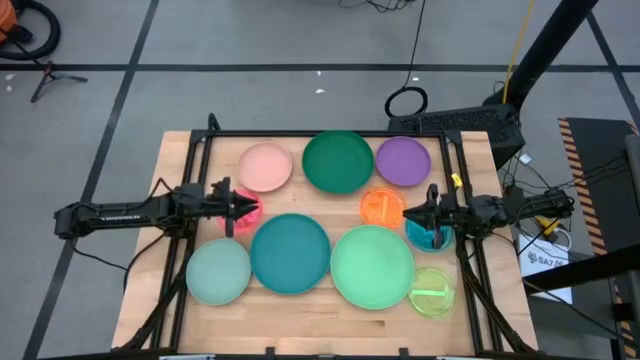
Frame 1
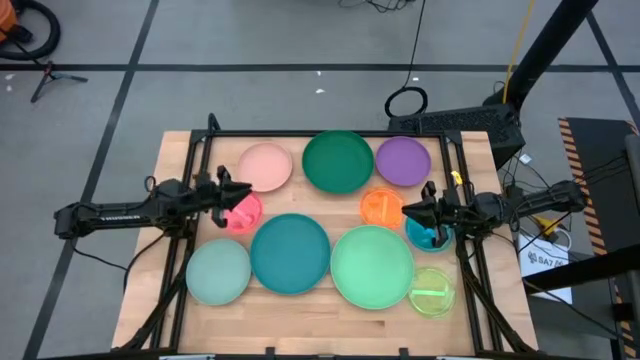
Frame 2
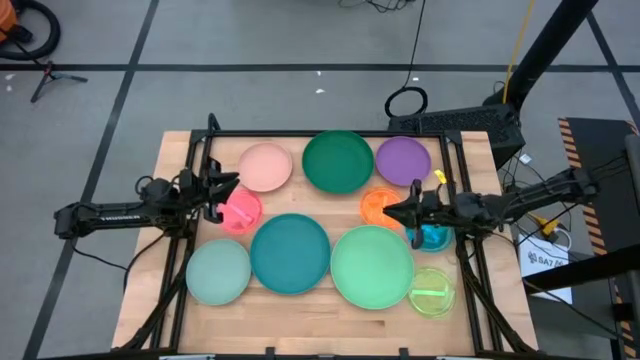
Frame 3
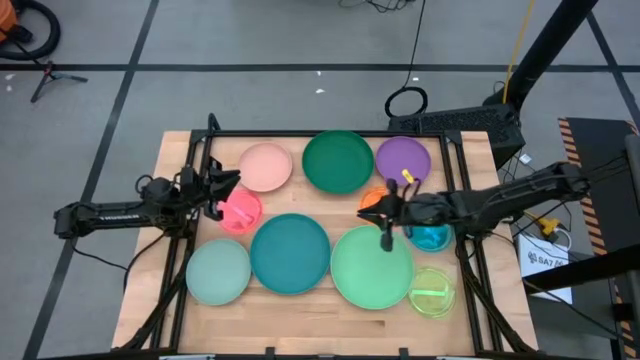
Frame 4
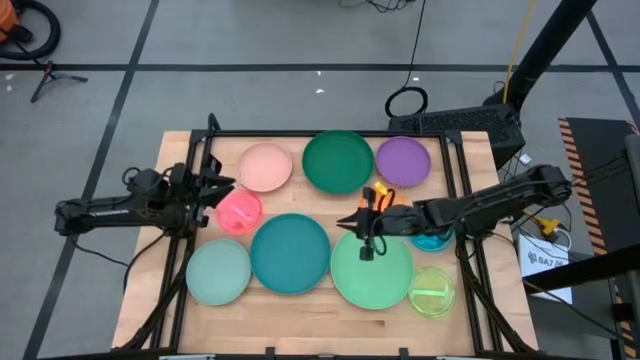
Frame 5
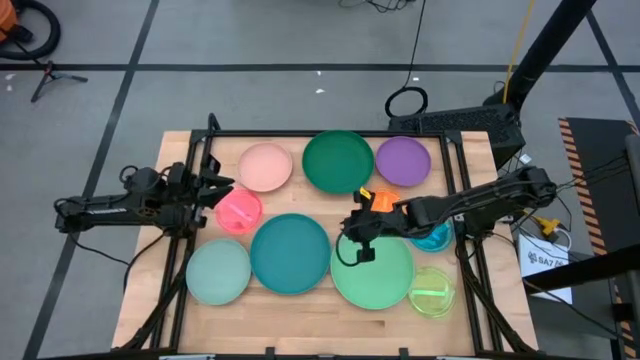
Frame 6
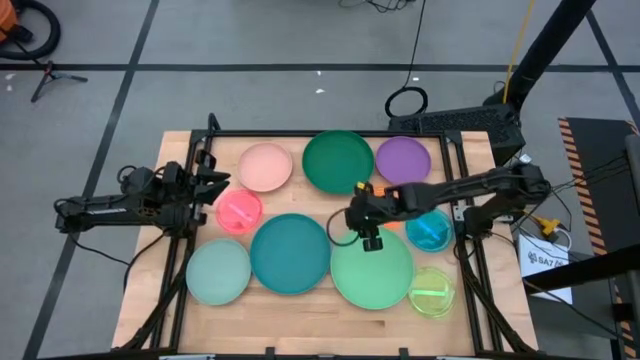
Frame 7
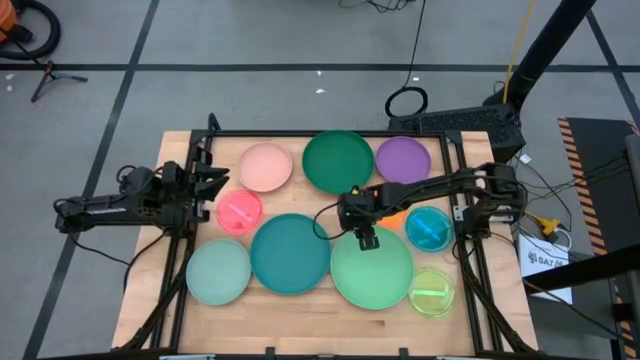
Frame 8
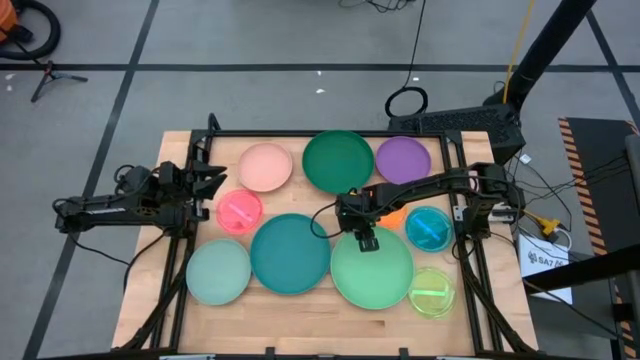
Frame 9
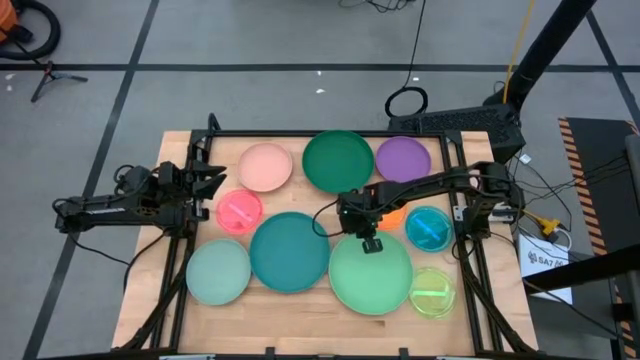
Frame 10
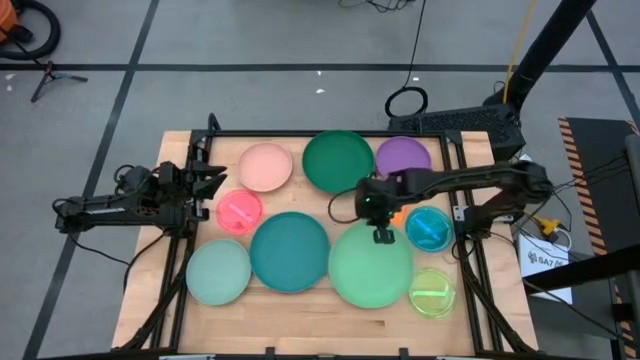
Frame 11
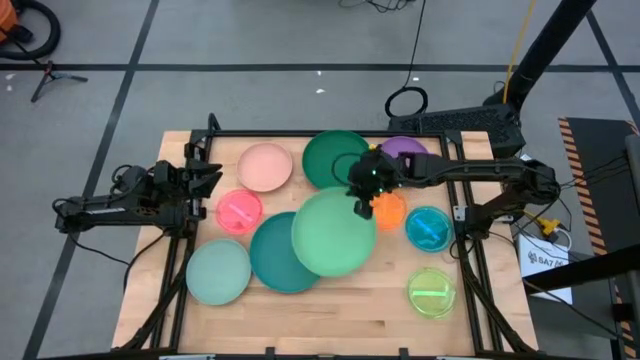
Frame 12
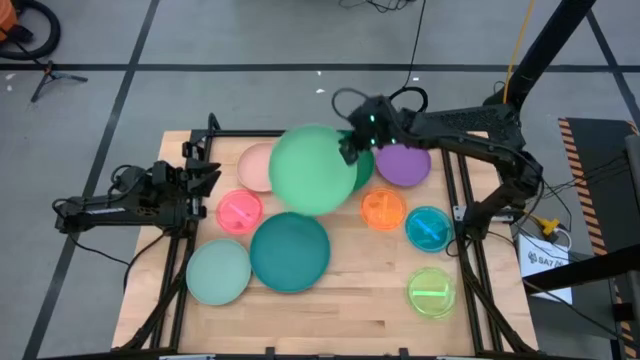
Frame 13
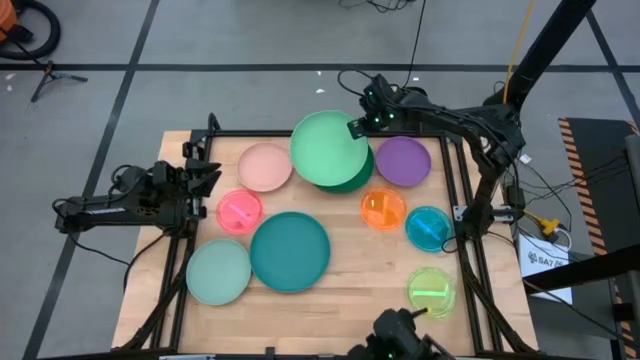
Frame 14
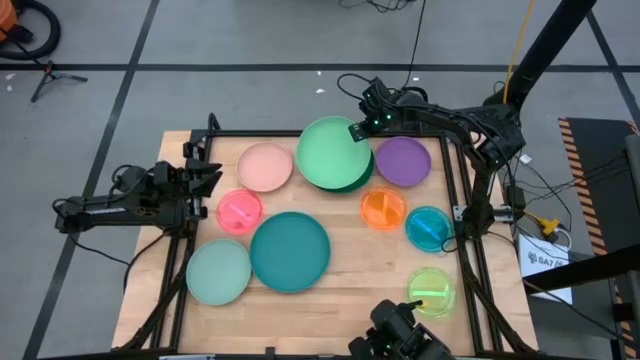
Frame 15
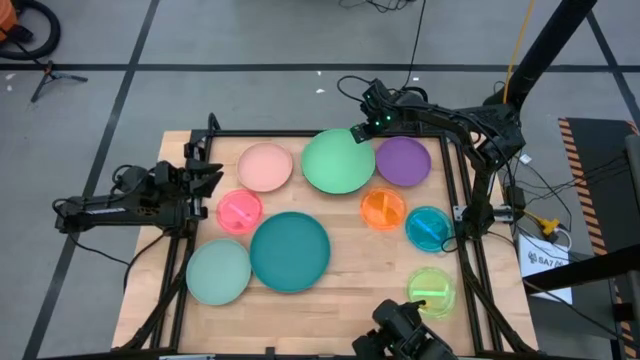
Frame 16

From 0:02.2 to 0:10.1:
Task: Stack plastic plates
Stack the green plate on the dark green plate

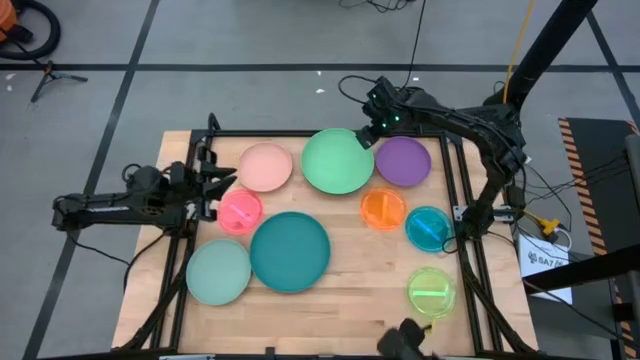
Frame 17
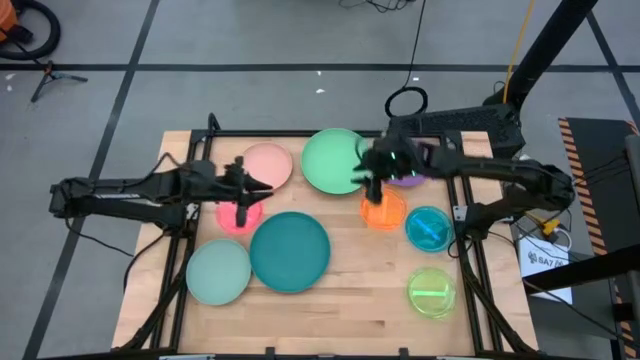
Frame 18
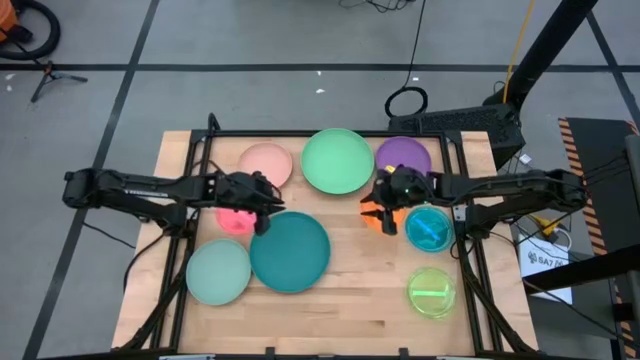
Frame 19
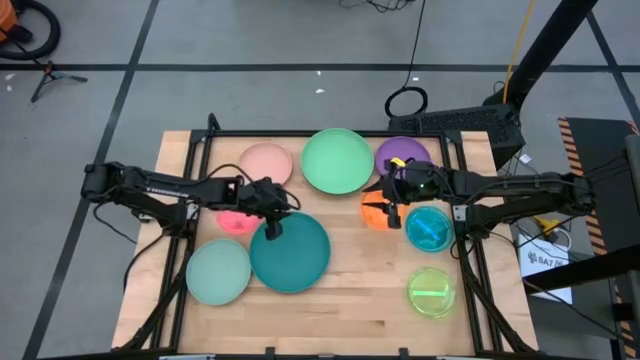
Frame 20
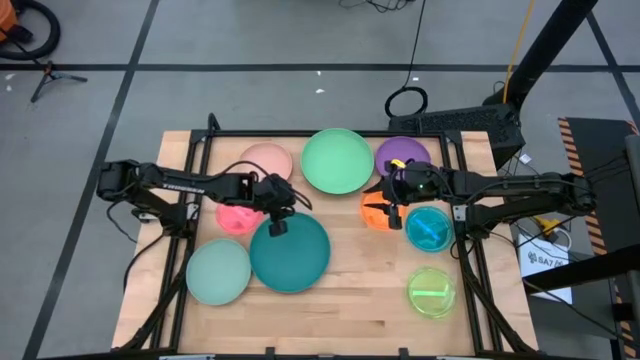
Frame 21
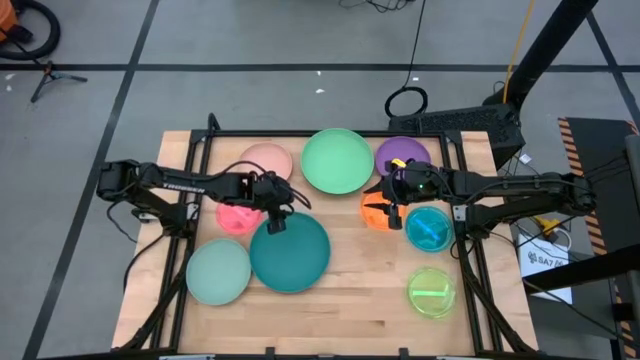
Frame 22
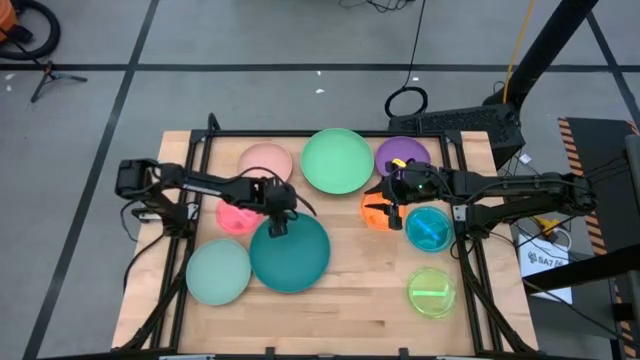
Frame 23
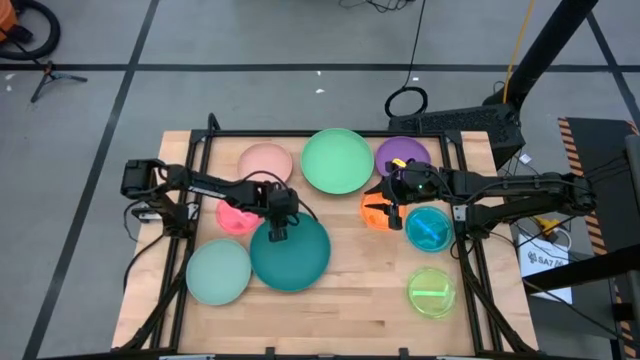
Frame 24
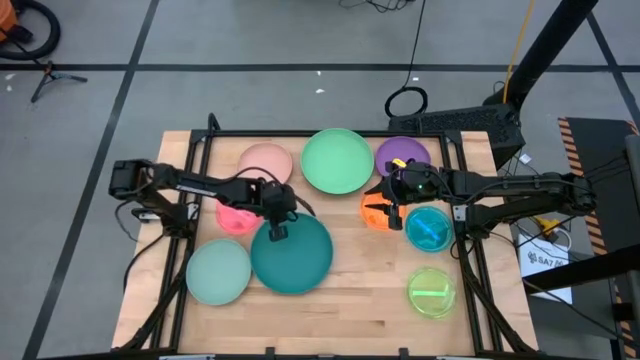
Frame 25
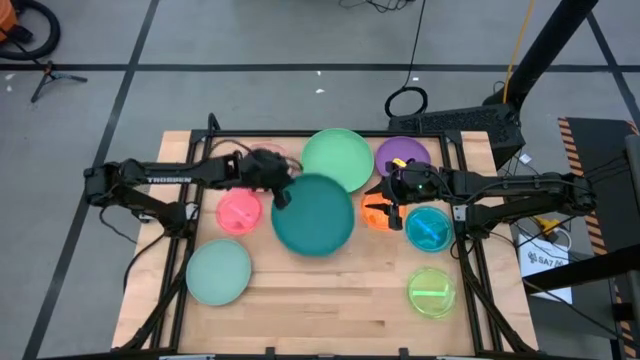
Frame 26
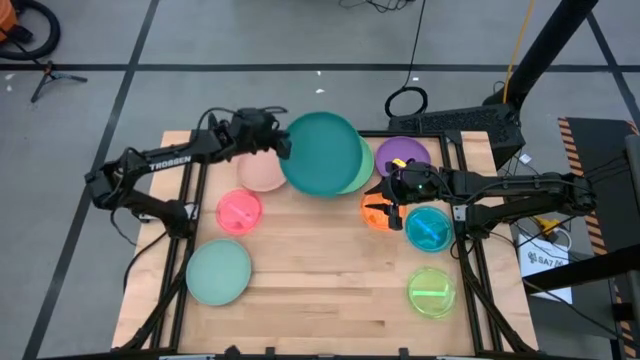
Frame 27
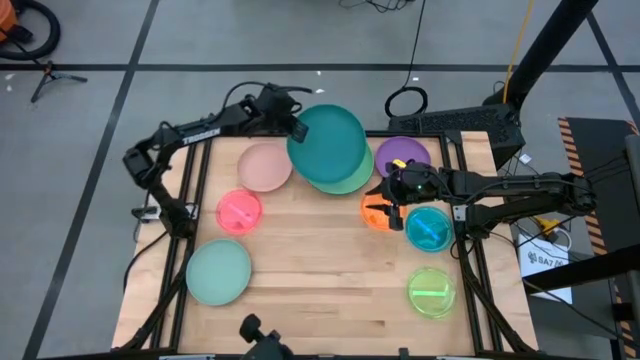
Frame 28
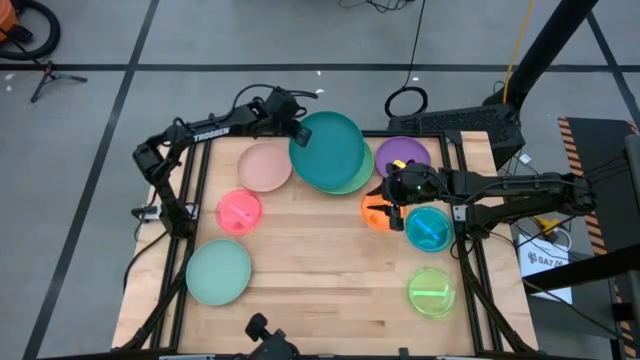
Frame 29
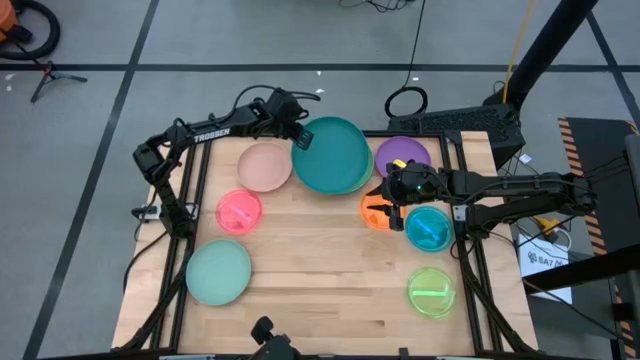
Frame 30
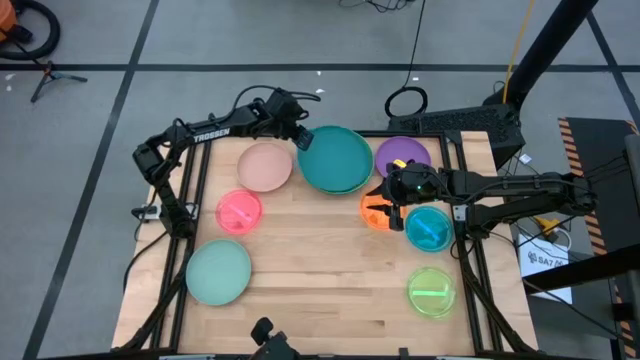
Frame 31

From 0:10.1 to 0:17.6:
Stack the dark blue plate on the green plate

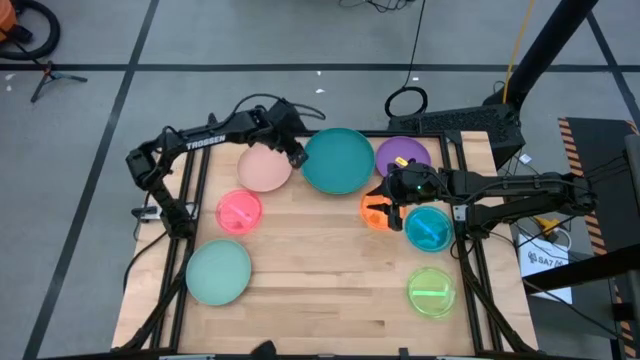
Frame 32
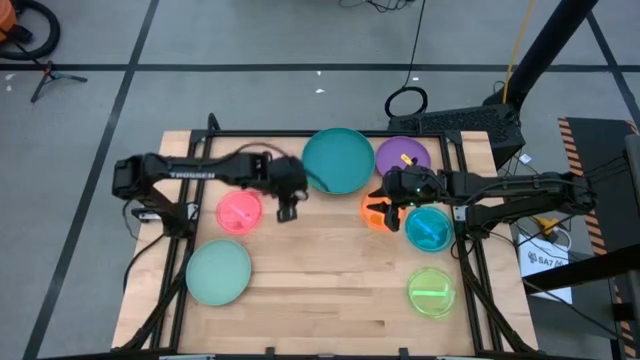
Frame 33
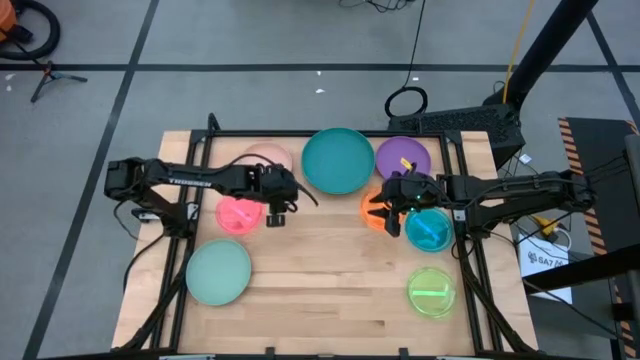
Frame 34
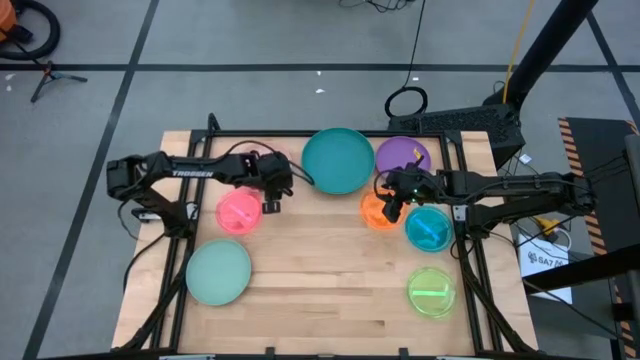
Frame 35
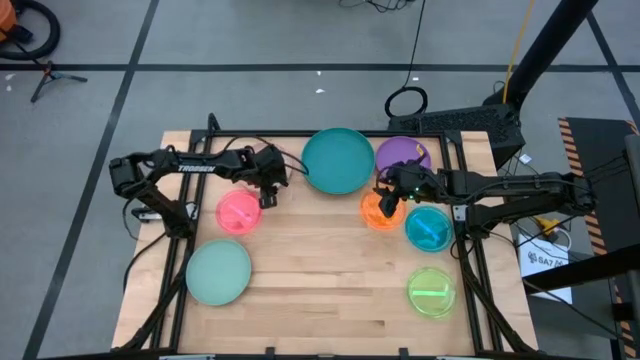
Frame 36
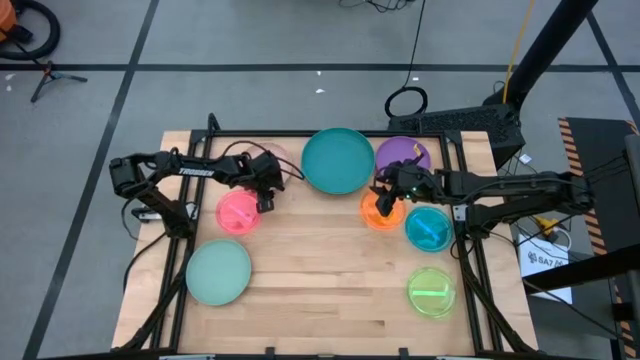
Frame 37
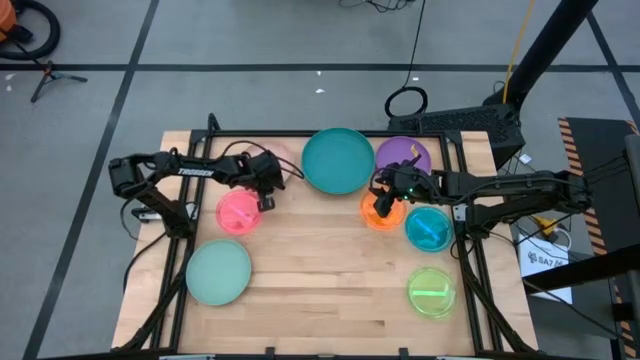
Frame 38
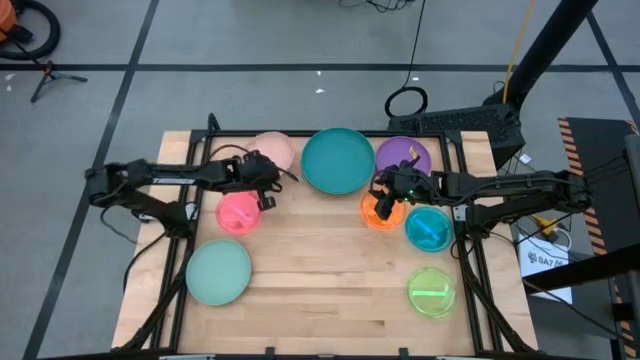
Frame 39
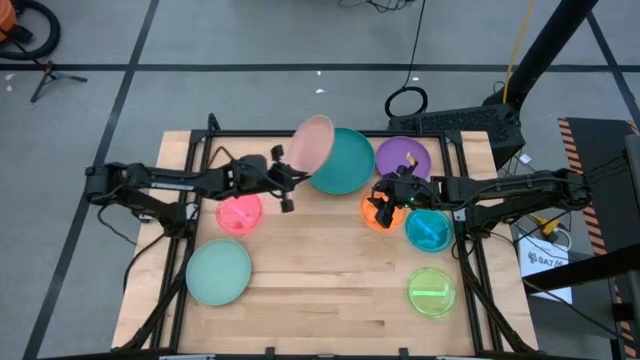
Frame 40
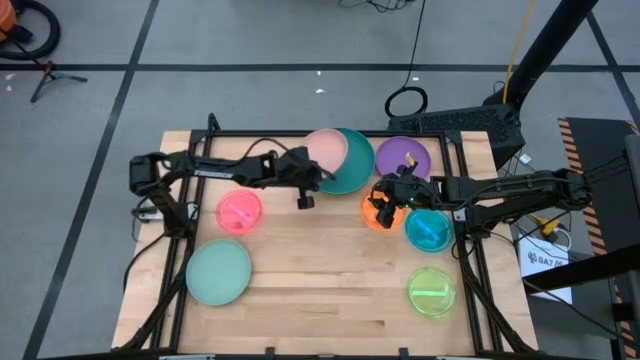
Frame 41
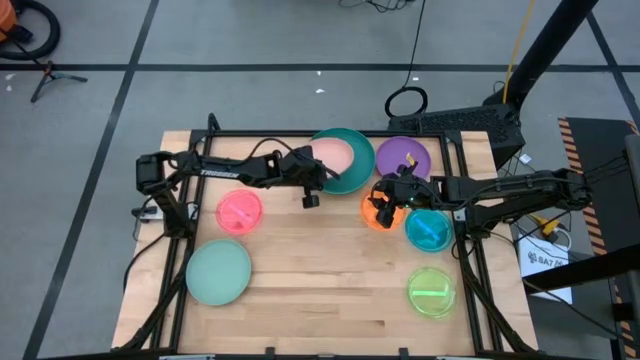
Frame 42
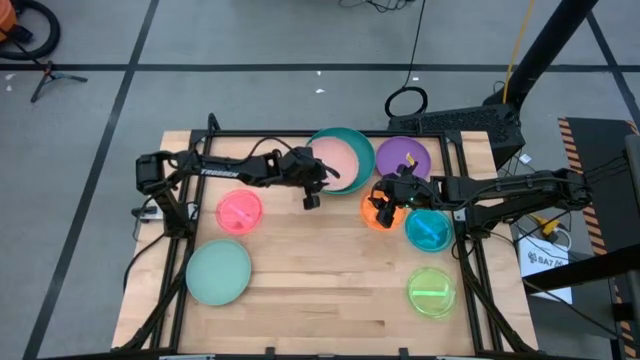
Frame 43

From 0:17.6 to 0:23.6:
Stack the light pink plate on the dark blue plate
